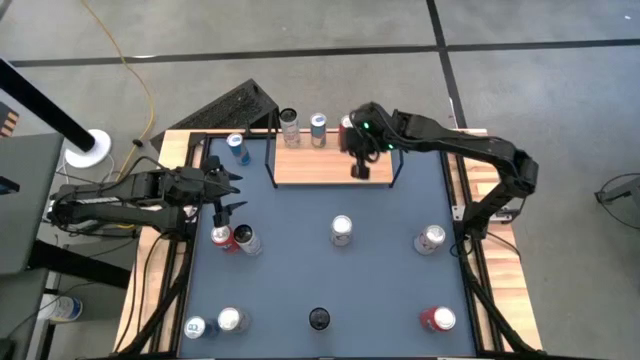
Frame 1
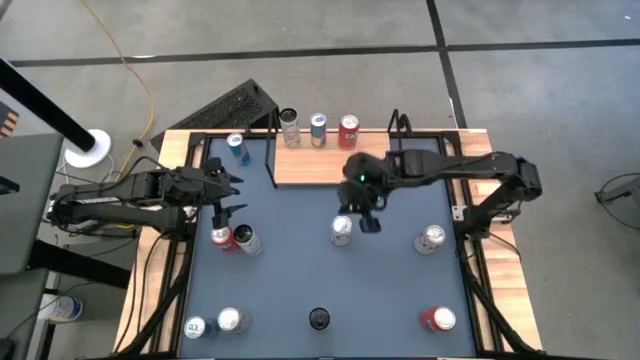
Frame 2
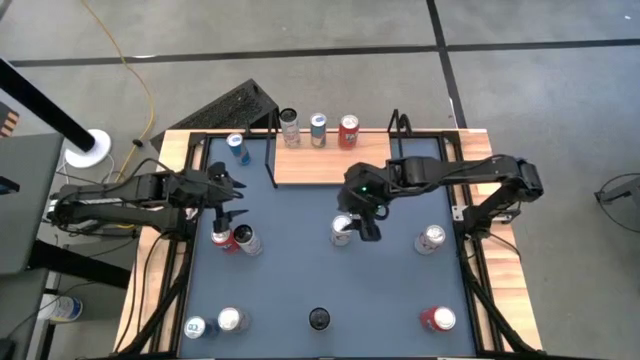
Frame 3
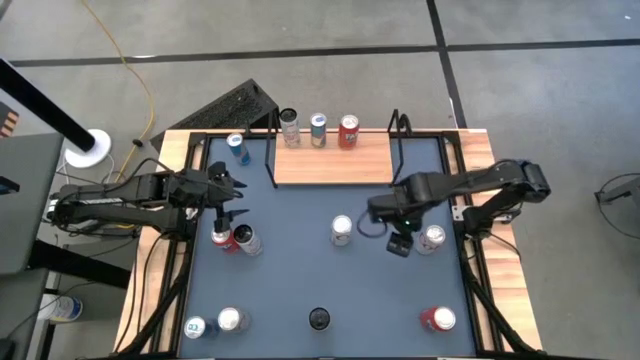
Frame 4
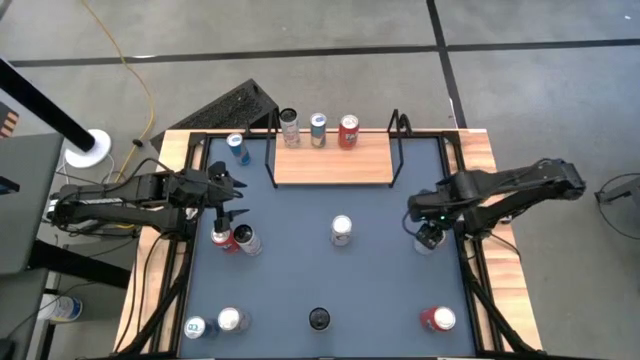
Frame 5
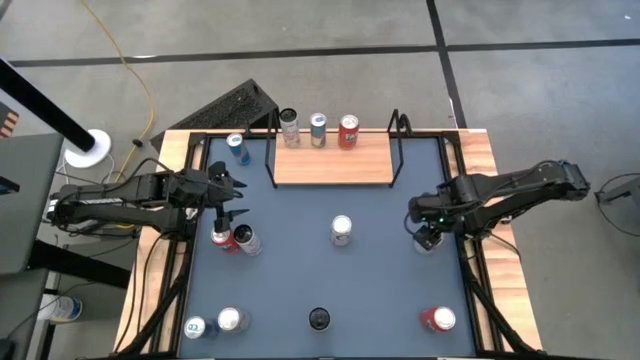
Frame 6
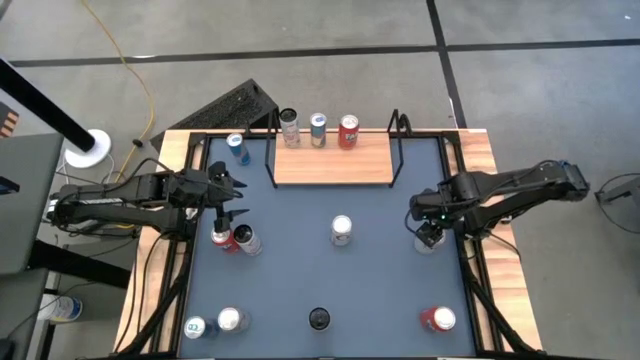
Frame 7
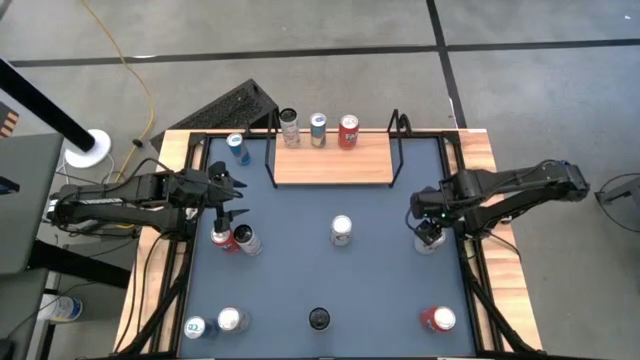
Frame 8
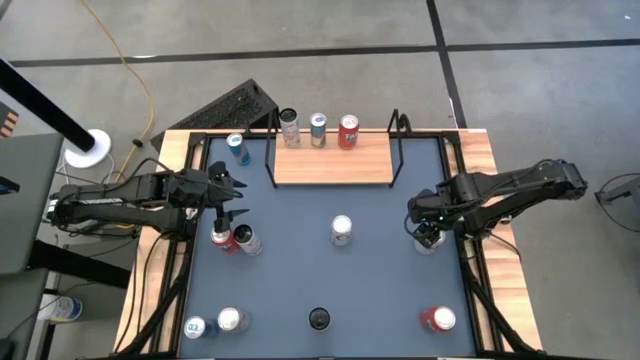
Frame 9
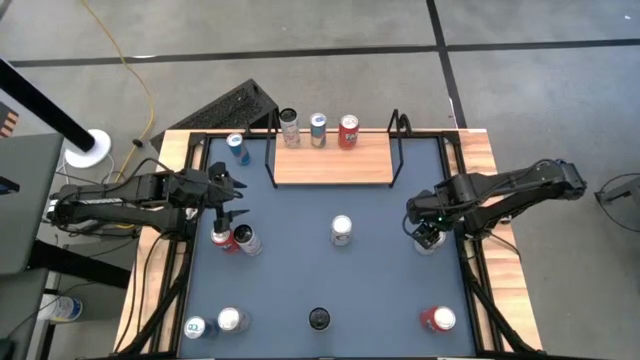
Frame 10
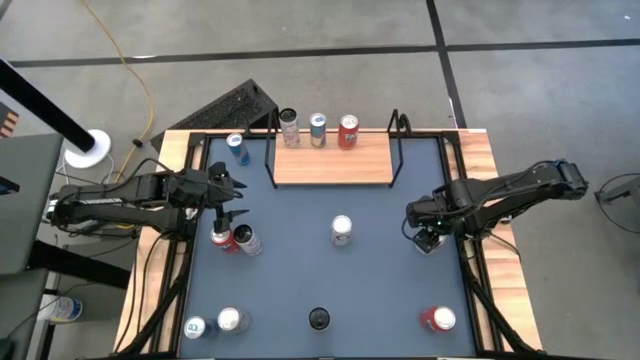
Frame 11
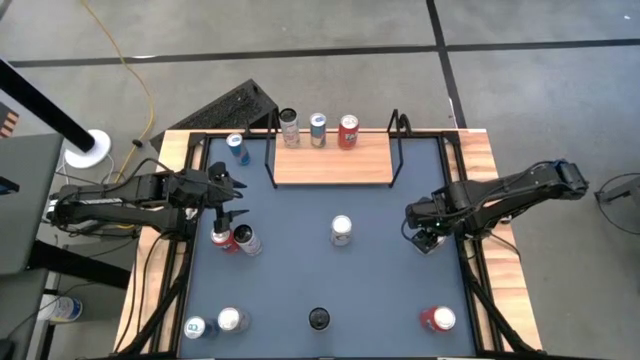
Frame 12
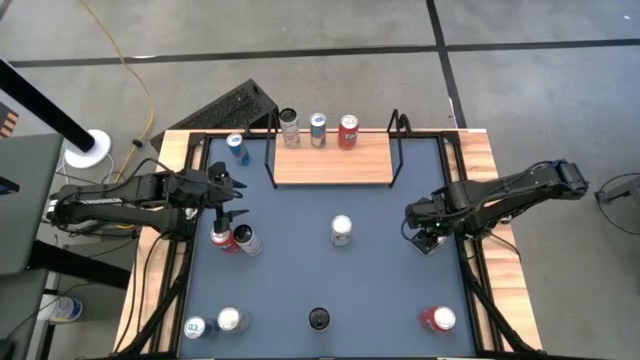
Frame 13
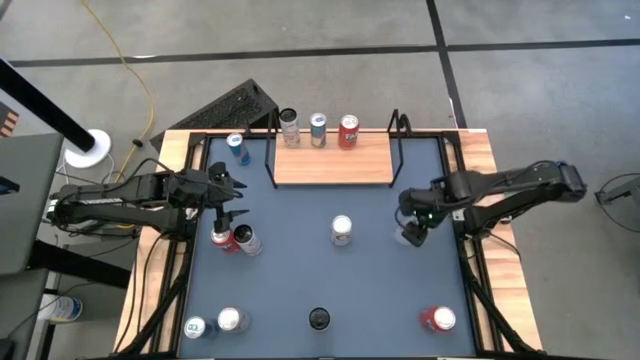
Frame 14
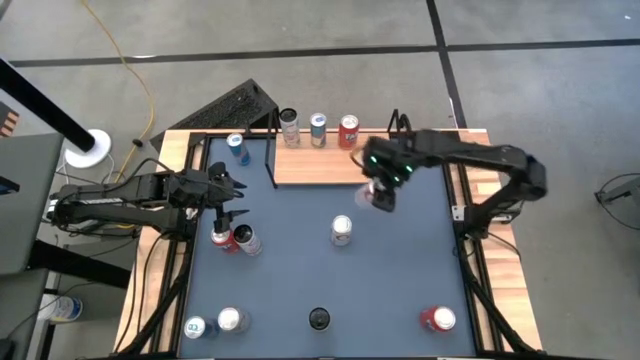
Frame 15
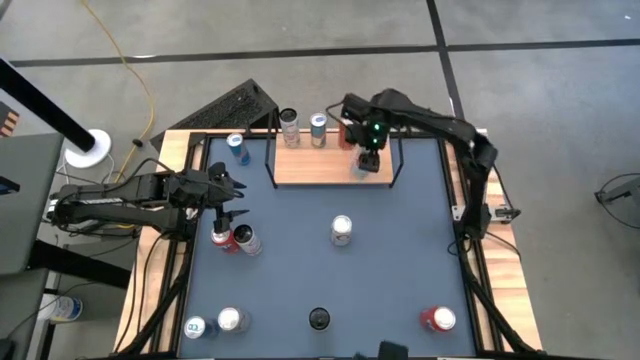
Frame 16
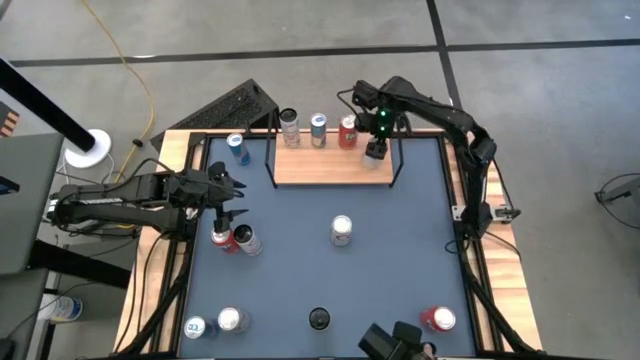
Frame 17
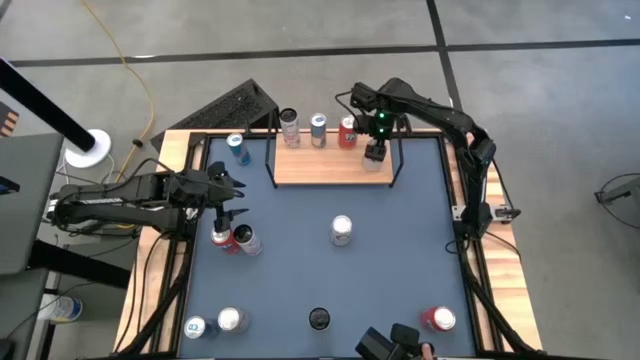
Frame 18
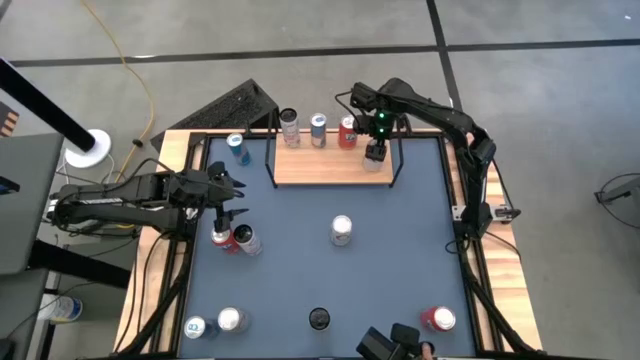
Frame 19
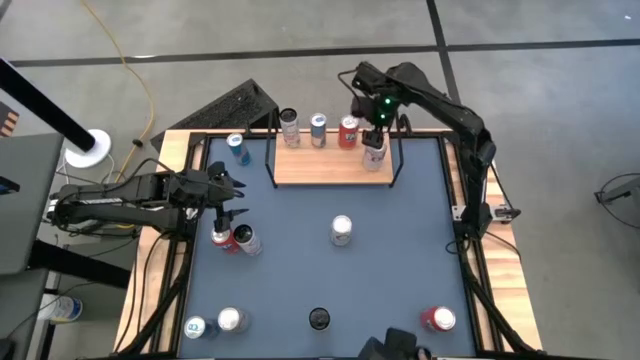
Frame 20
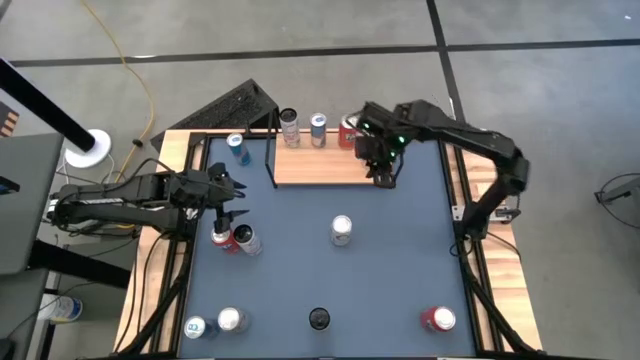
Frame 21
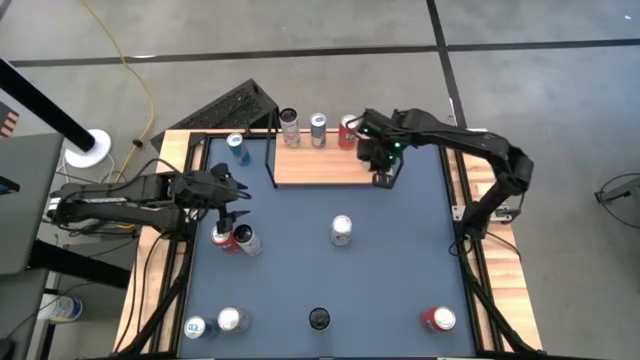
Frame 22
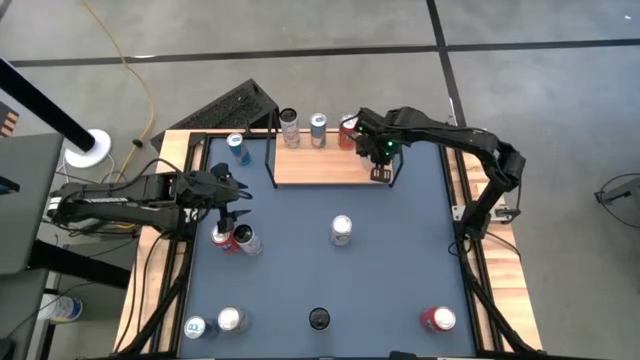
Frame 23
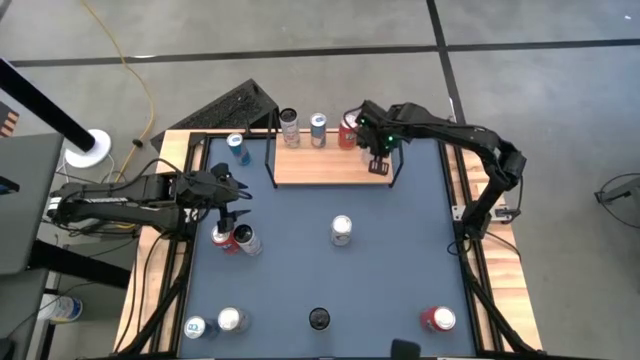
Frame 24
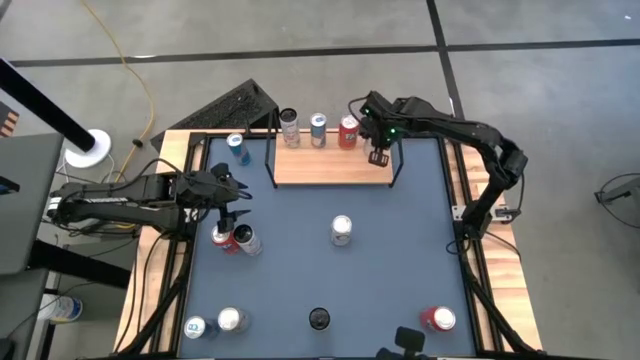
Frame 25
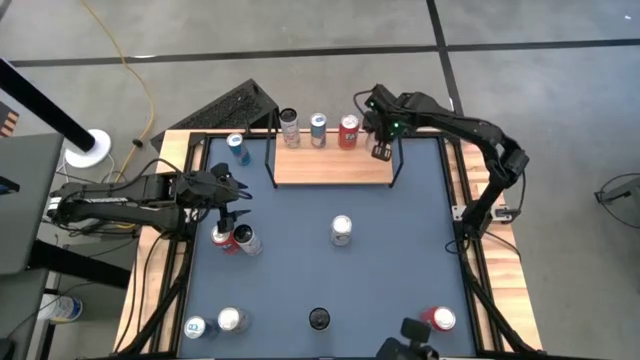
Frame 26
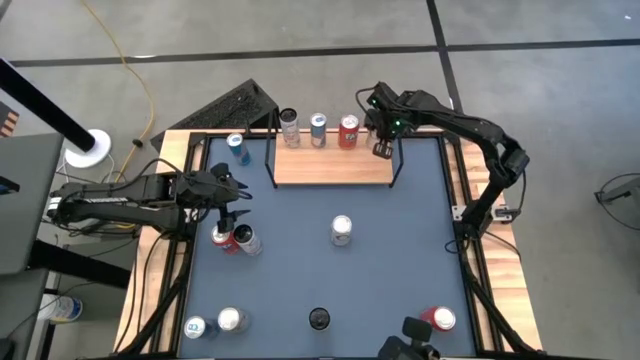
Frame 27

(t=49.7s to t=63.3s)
Task: Place canned beverage on shelf
Put the right silver soda can on the shelf

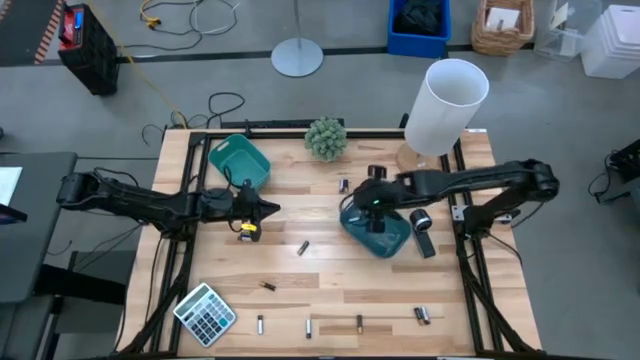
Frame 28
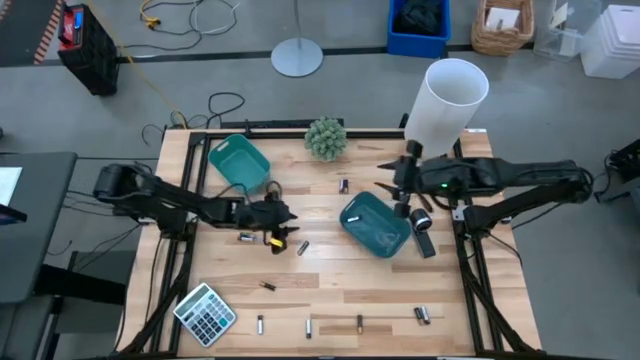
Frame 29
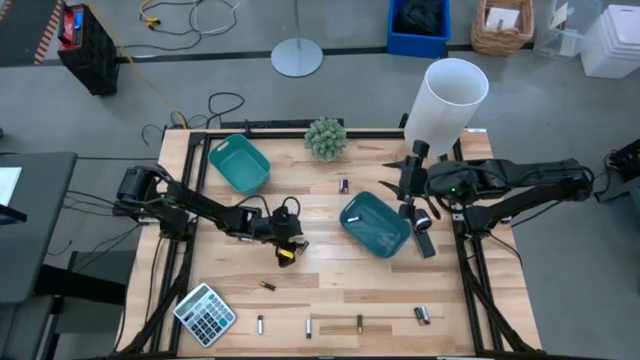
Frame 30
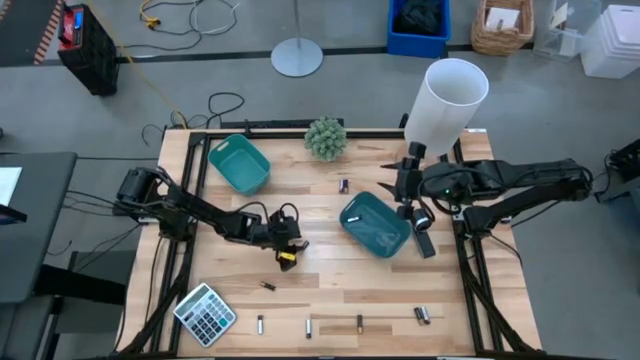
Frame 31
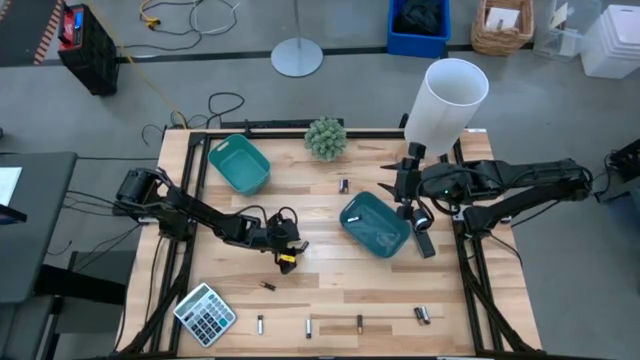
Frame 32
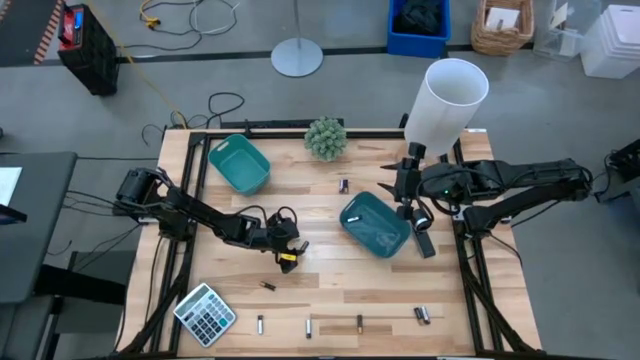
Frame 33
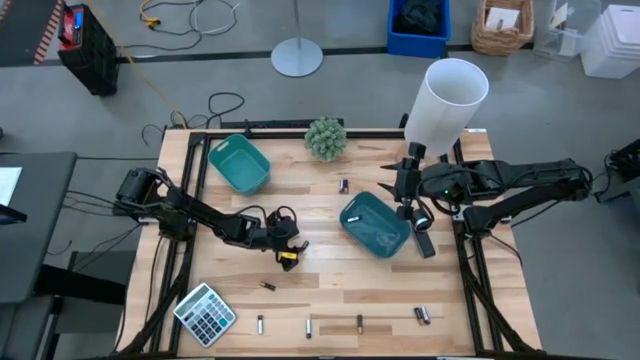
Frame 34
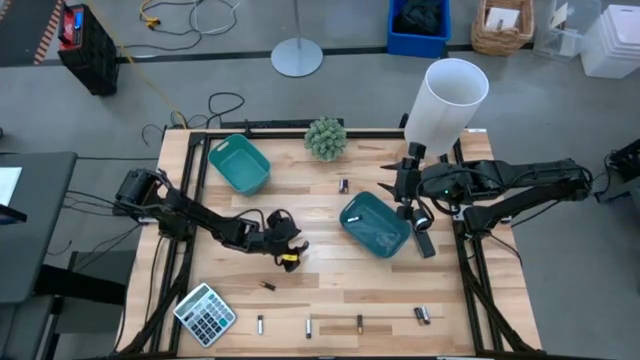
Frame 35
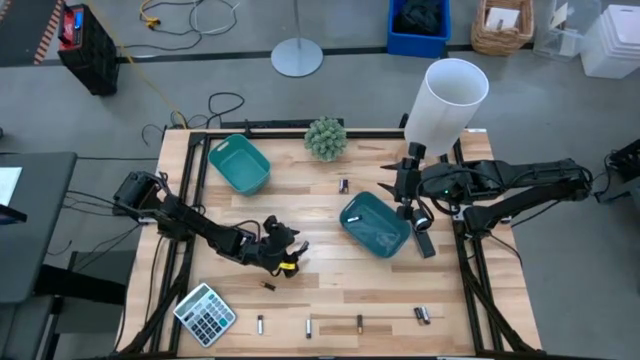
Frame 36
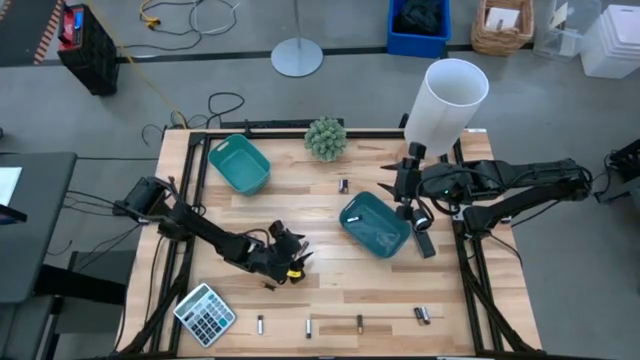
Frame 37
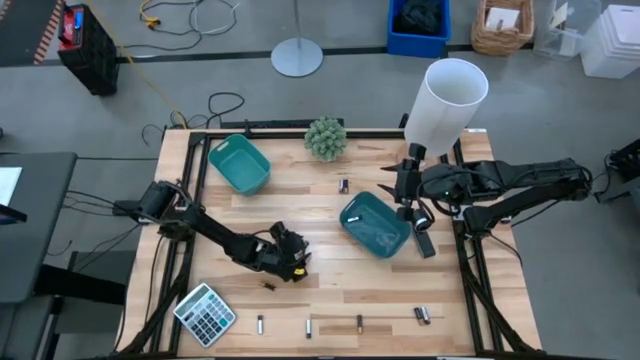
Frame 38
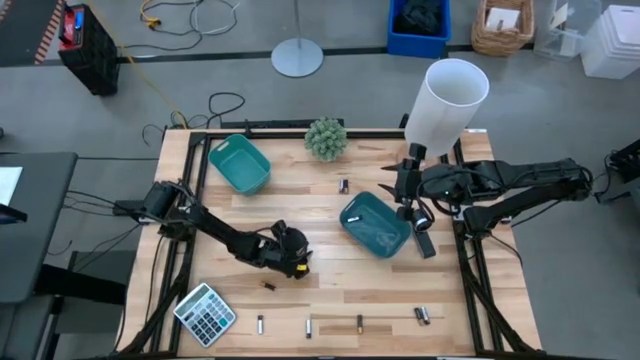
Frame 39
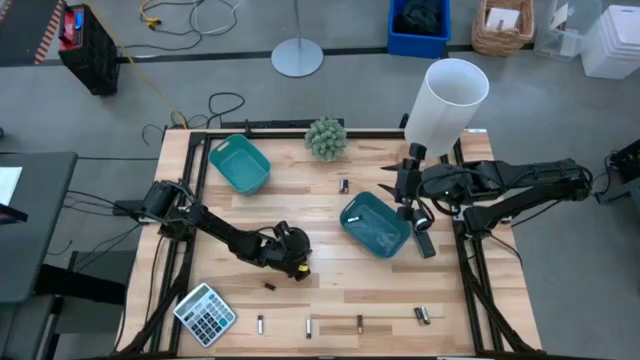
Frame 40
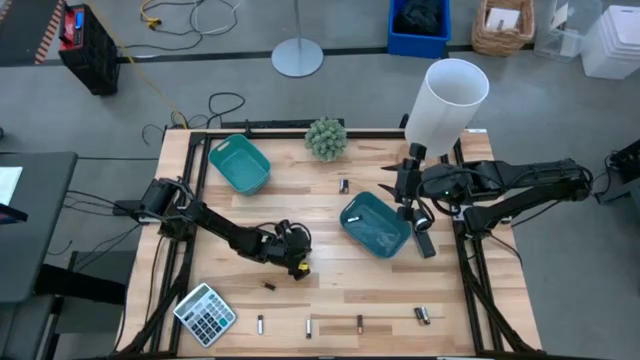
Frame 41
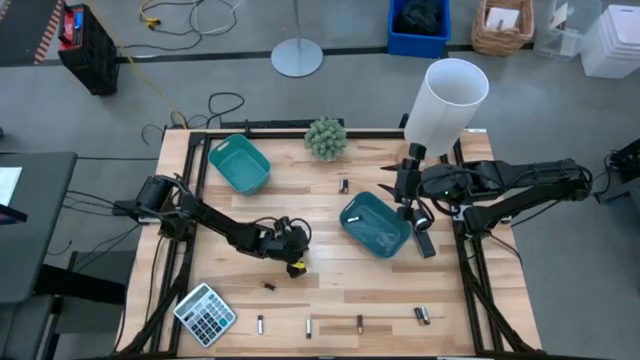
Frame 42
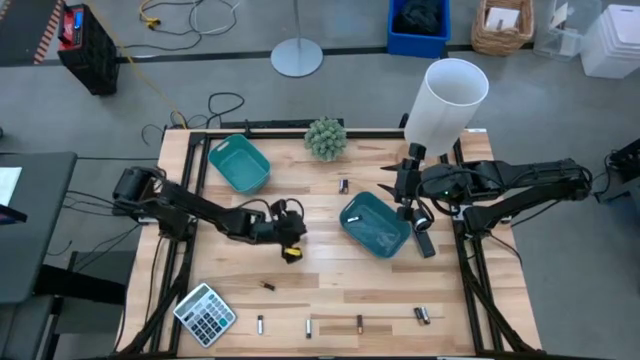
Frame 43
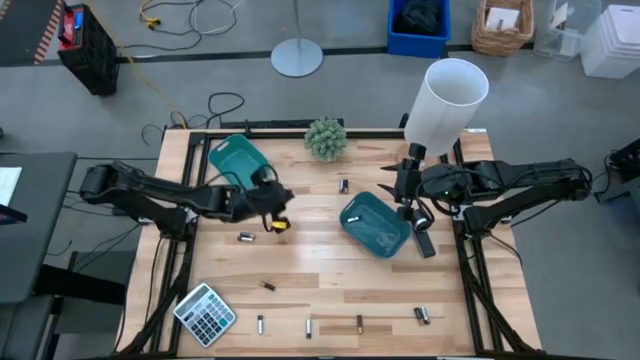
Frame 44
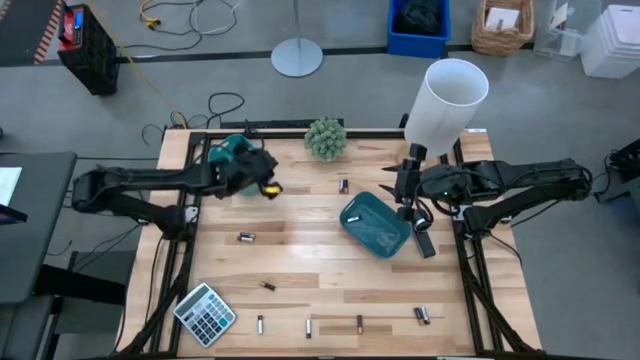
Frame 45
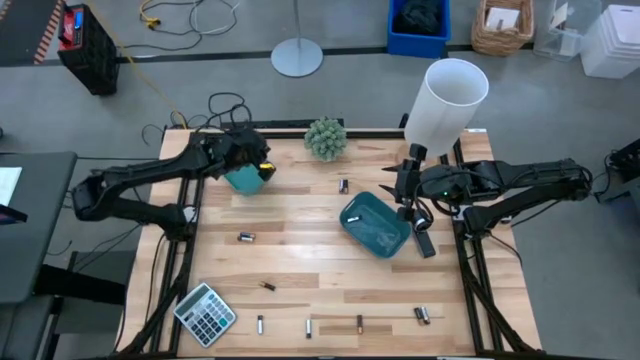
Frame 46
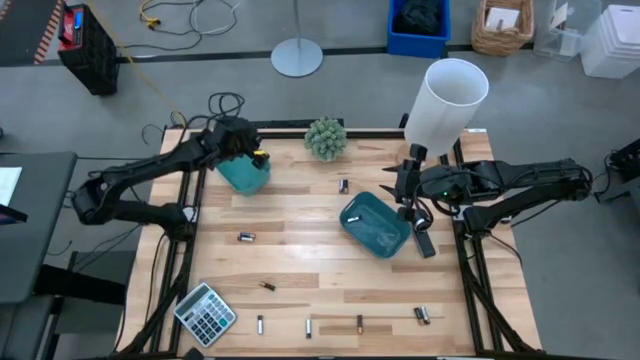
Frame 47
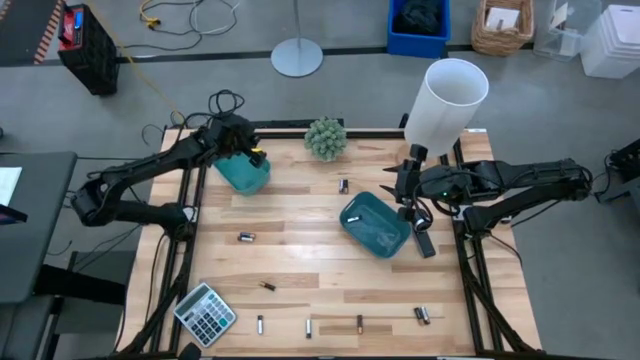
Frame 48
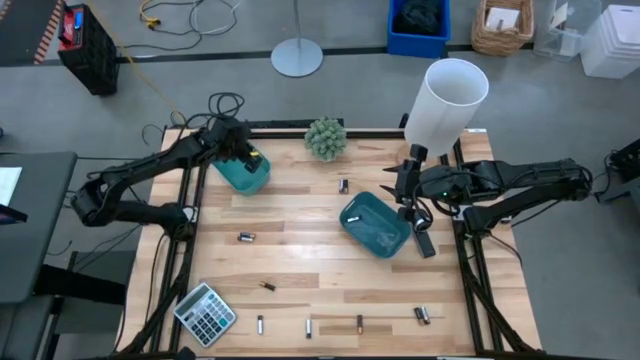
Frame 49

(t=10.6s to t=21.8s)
Task: Sort batteries
Put the black battery into the green bin
